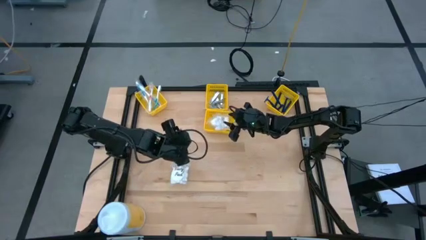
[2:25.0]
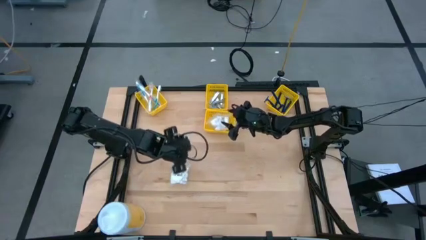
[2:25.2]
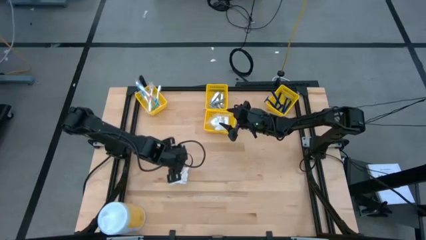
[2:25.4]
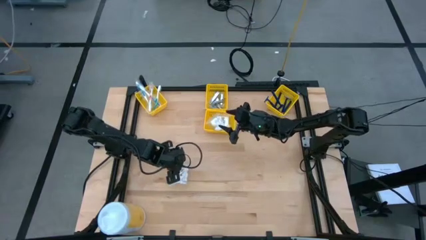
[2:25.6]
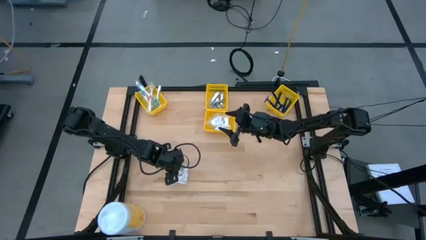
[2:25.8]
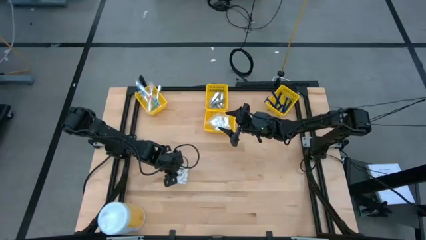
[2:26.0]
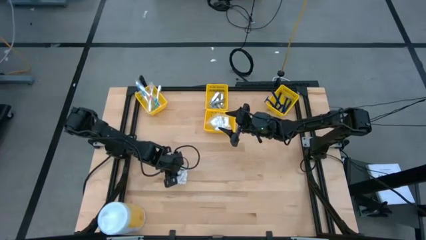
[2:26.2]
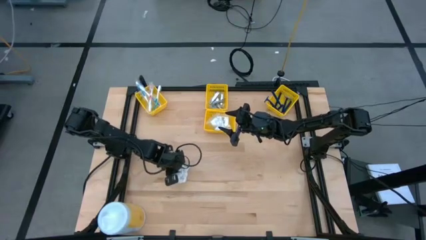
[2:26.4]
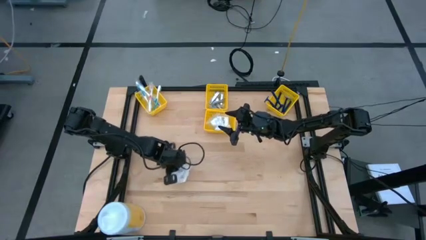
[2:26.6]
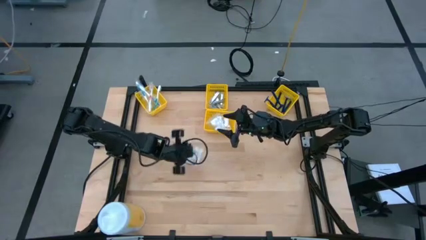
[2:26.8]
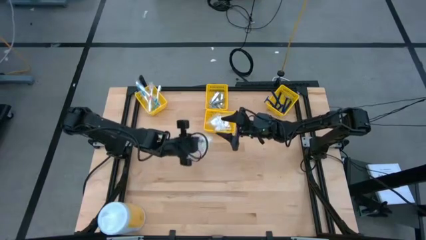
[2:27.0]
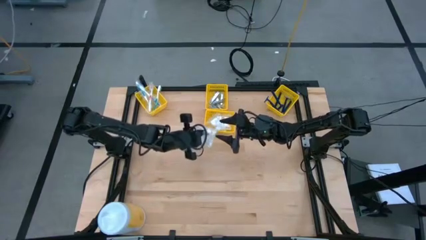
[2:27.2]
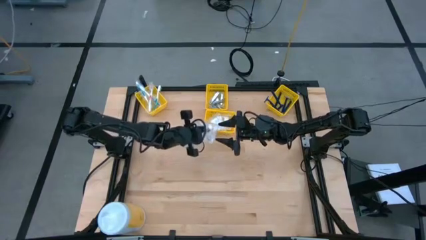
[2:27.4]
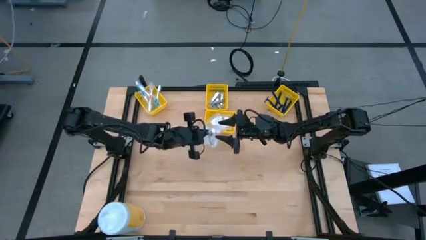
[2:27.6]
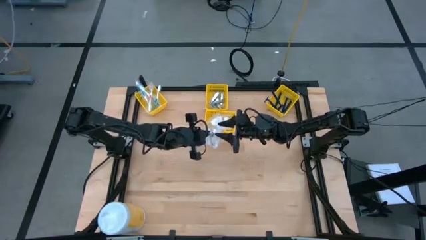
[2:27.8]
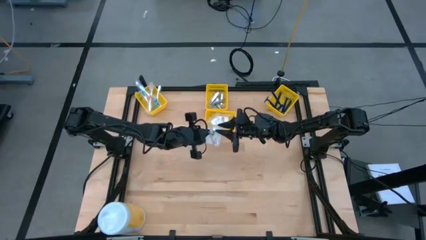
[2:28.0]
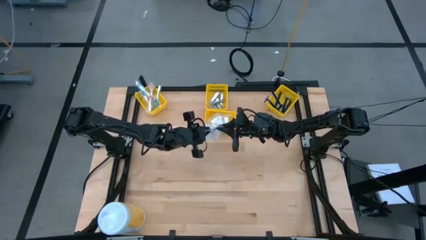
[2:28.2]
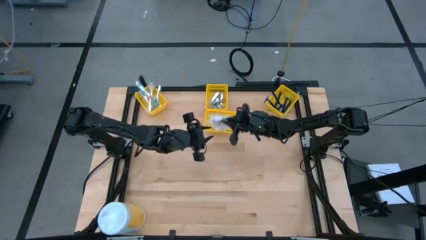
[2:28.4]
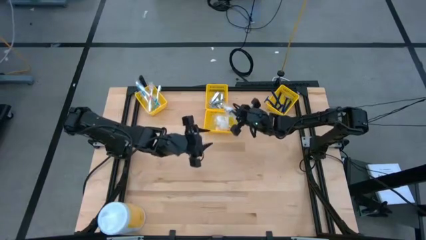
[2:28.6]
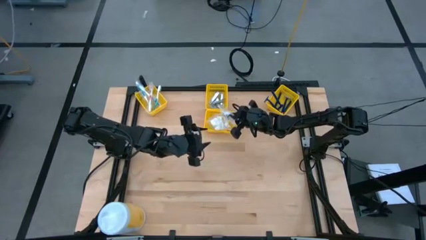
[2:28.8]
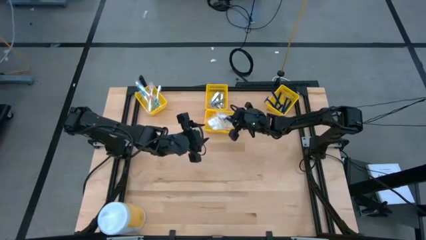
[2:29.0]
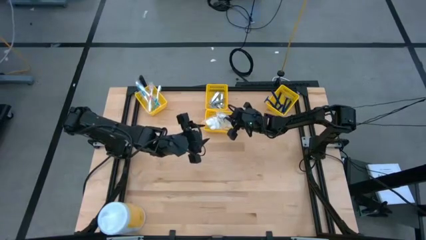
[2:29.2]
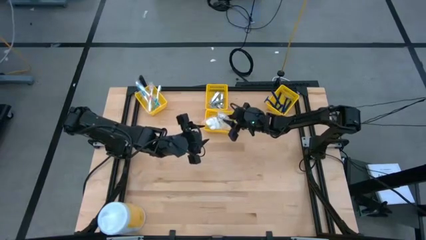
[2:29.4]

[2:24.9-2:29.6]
Task: Pick & Place Travel size toiletries
Put the cotton pack into the bottom middle yellow bin

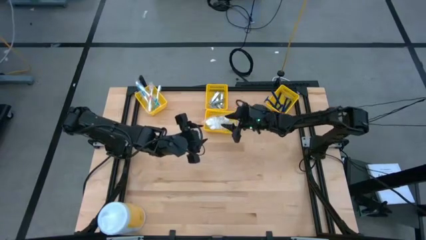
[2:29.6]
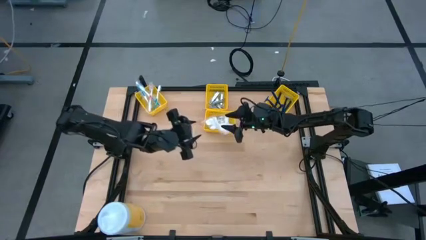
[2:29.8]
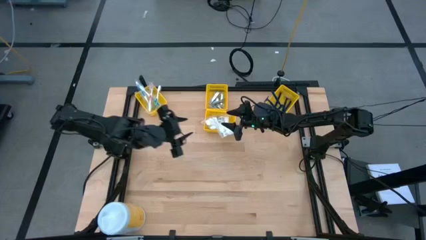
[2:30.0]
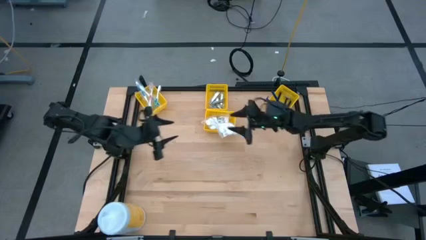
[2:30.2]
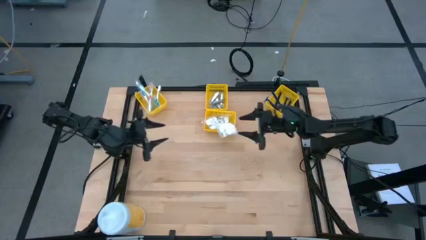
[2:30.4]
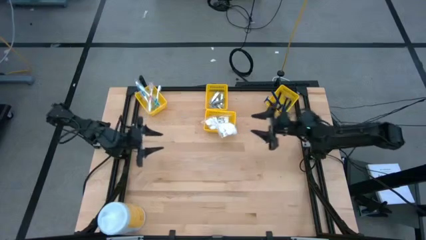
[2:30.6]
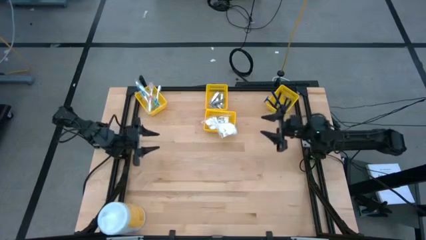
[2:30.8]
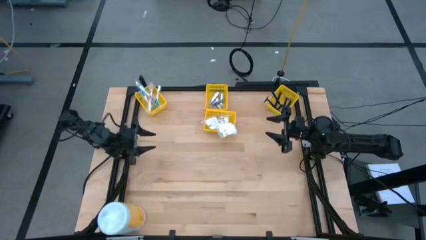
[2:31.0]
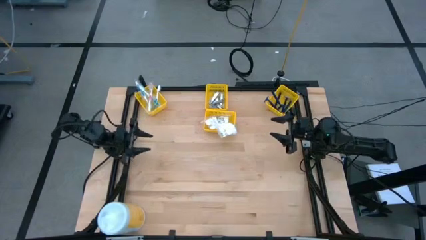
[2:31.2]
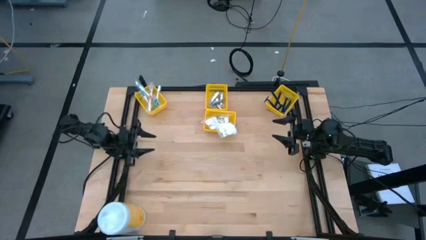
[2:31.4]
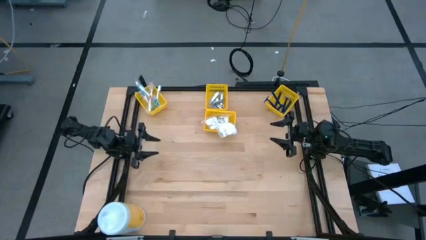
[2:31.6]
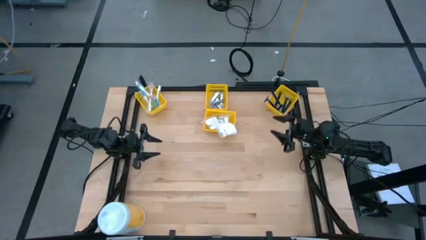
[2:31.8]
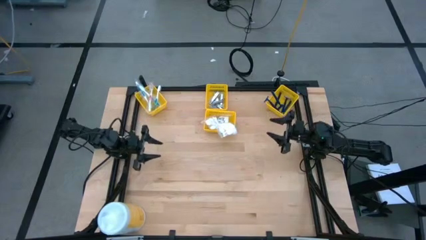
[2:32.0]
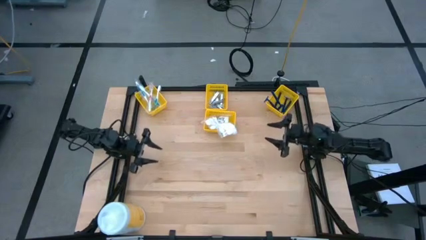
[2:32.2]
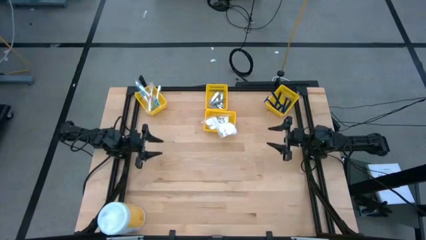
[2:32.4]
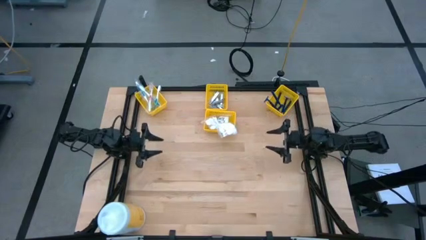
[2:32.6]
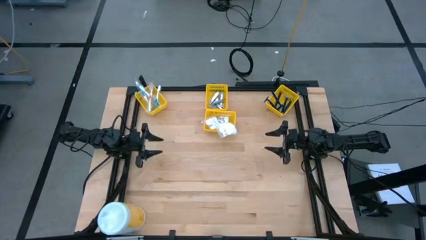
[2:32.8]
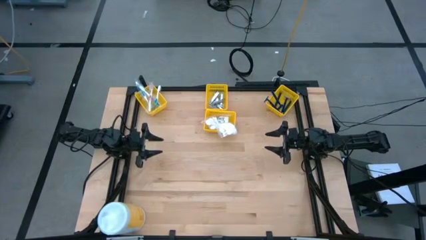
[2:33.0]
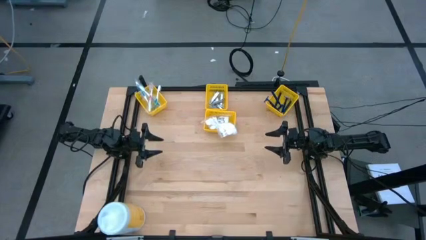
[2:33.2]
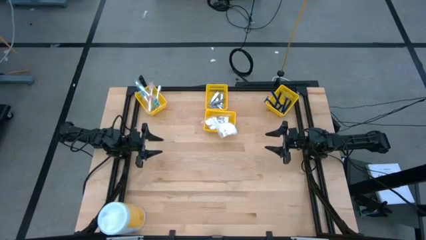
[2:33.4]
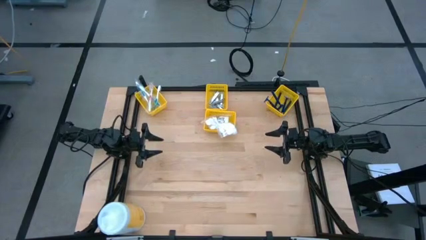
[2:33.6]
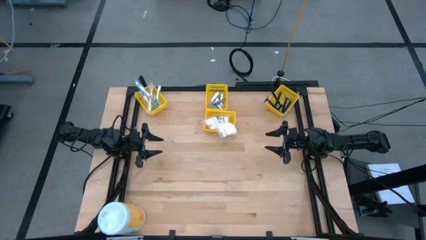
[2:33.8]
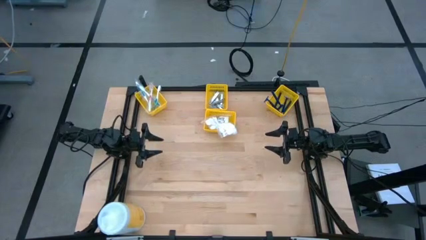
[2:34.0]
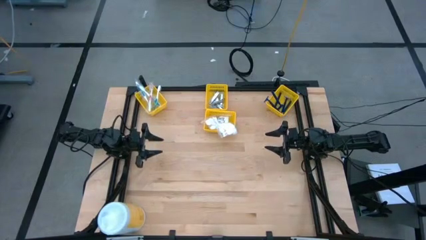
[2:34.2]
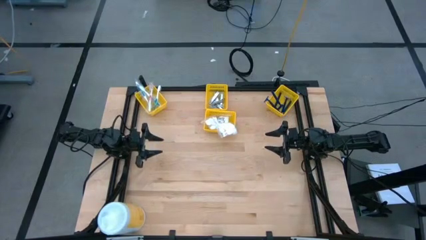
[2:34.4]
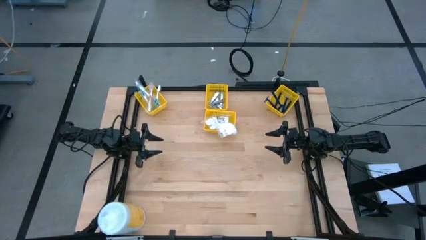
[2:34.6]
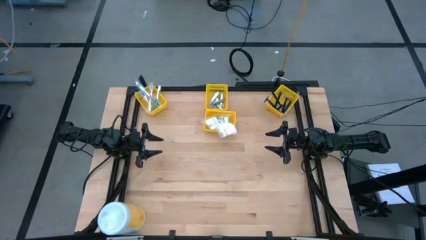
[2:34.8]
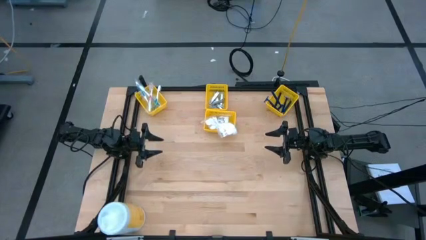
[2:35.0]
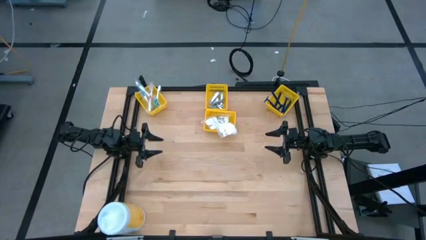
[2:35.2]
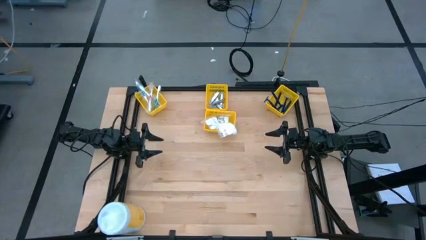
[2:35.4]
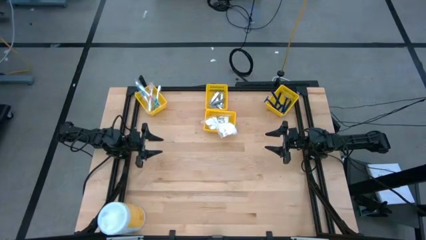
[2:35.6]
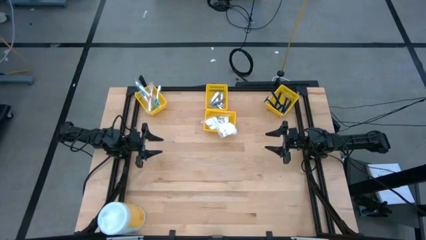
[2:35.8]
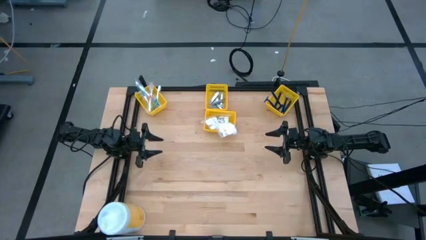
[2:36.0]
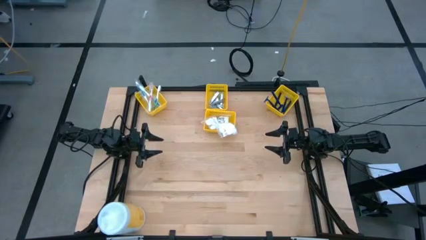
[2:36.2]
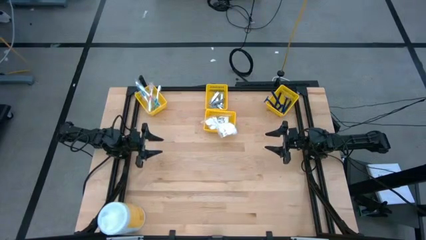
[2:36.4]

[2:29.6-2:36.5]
Return to Home Position

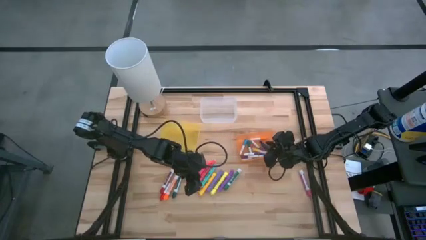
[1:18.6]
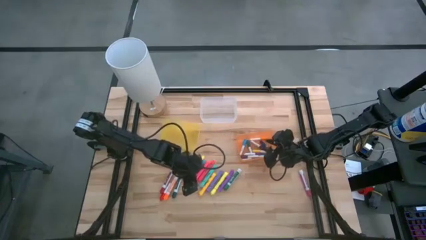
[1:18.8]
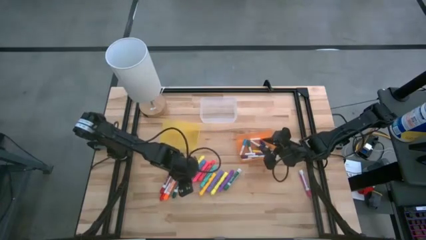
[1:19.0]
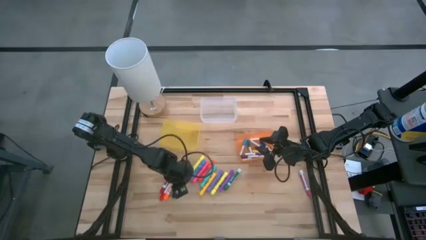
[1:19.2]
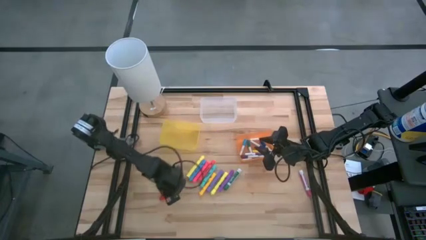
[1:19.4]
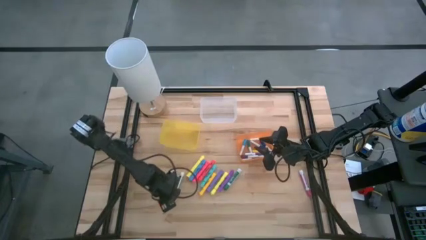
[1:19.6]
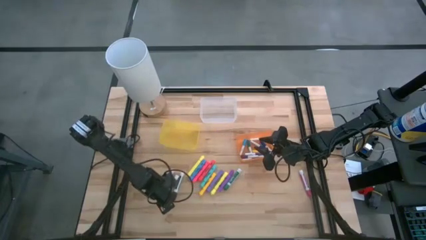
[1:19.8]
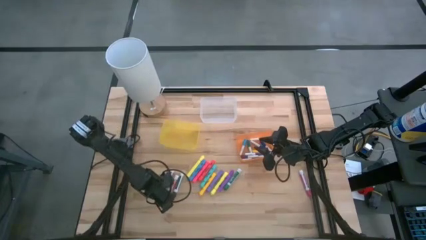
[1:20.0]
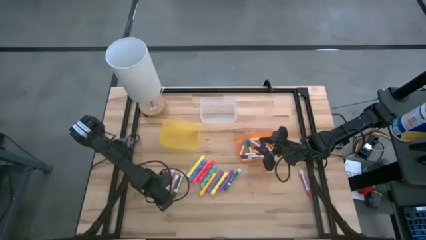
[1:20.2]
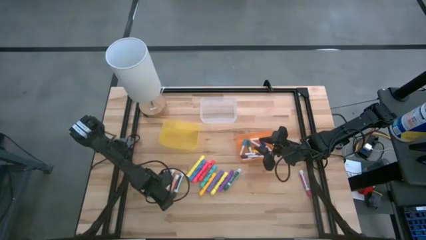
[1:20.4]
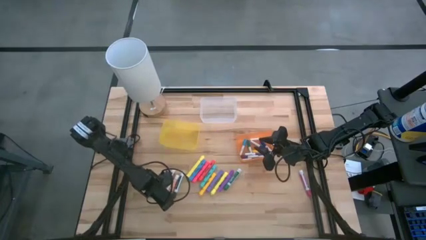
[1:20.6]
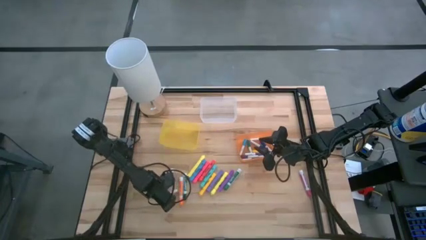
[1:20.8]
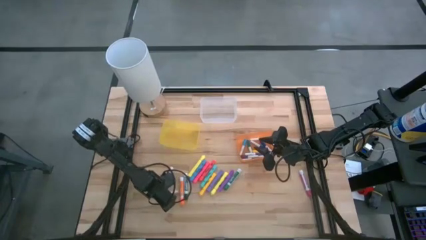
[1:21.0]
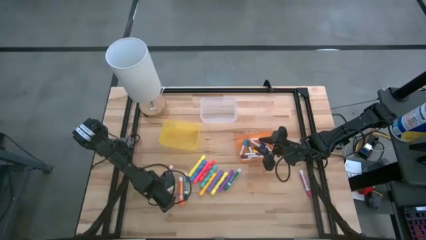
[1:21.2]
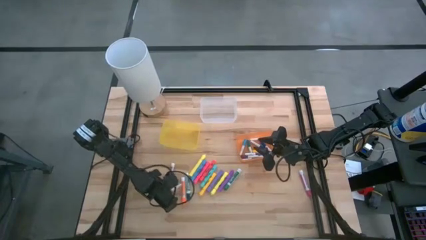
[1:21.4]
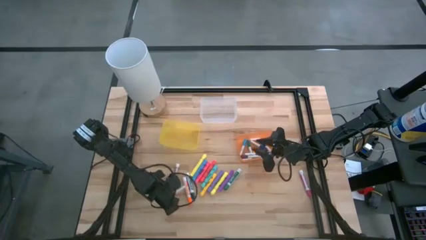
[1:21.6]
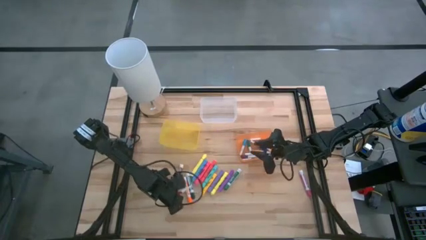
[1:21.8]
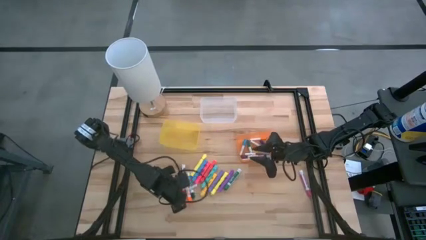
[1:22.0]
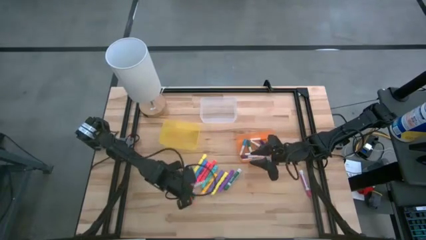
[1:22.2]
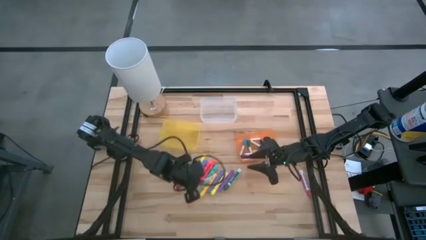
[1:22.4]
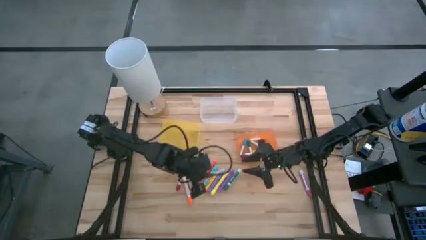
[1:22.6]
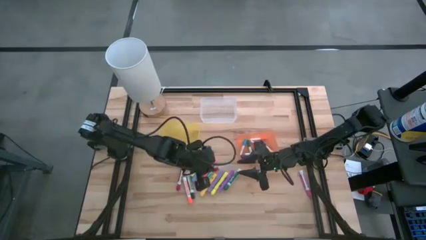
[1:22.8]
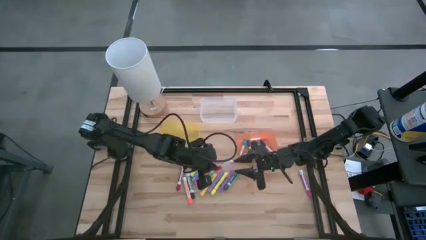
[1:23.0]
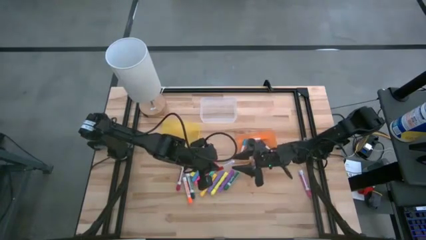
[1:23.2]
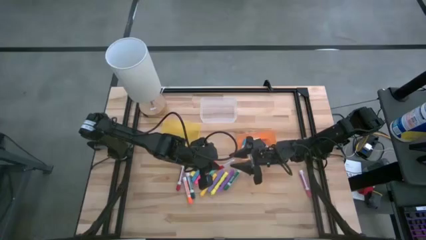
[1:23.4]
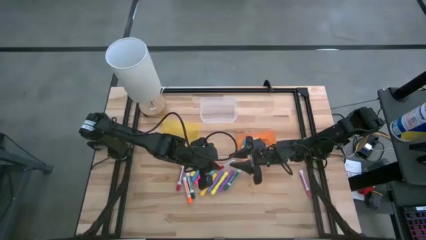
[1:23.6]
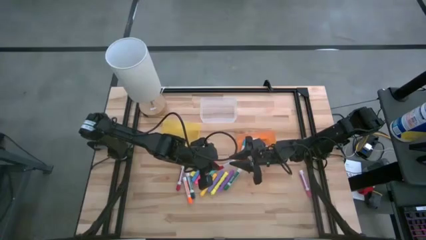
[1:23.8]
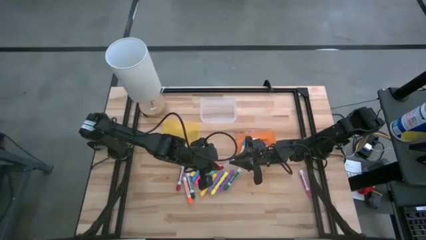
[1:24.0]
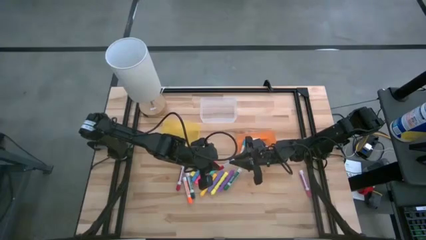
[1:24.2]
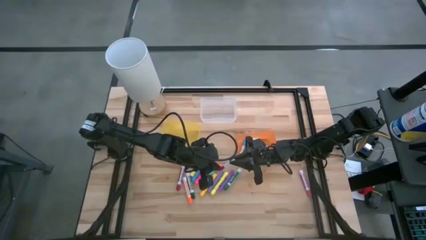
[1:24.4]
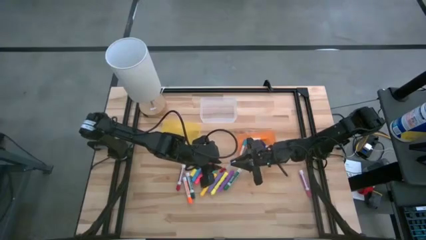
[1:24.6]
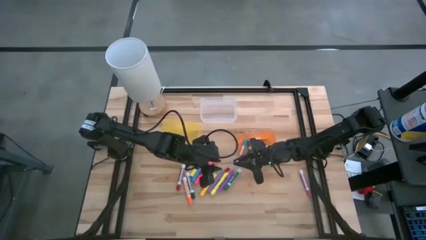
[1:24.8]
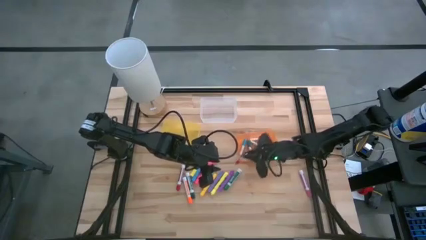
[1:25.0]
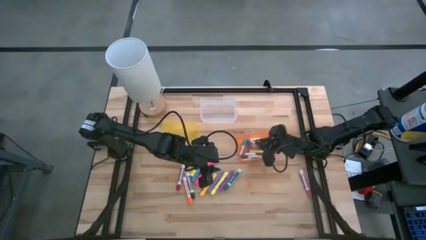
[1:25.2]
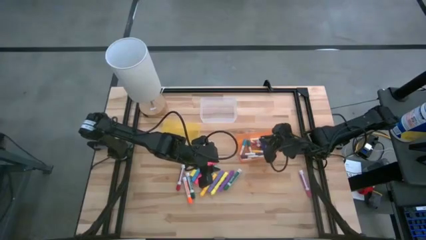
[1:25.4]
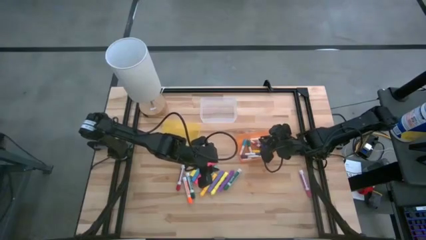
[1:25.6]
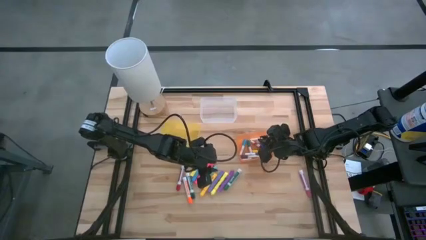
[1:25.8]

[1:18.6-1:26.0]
Task: Pick & Place Markers
Put the small red highlighter pen into the orange bin
